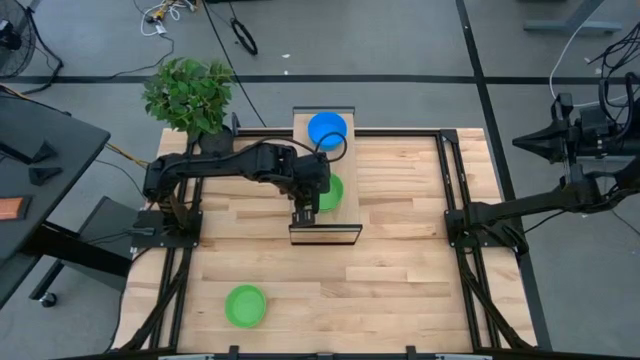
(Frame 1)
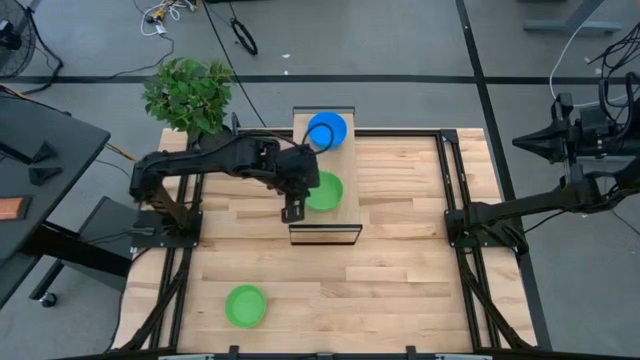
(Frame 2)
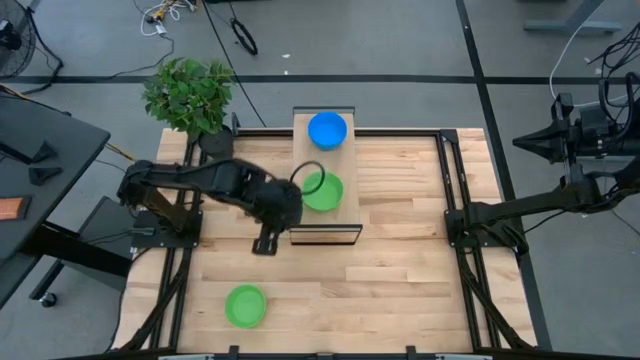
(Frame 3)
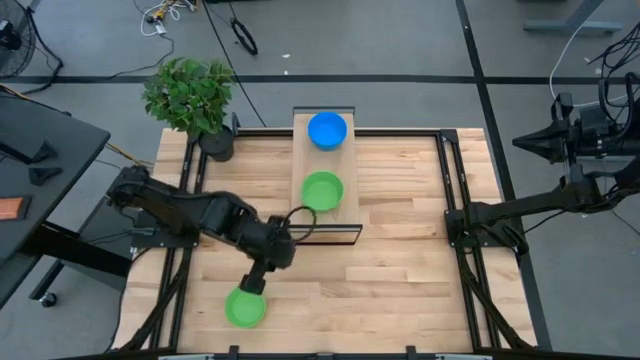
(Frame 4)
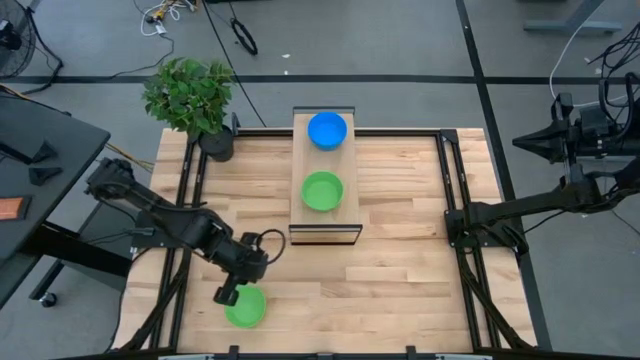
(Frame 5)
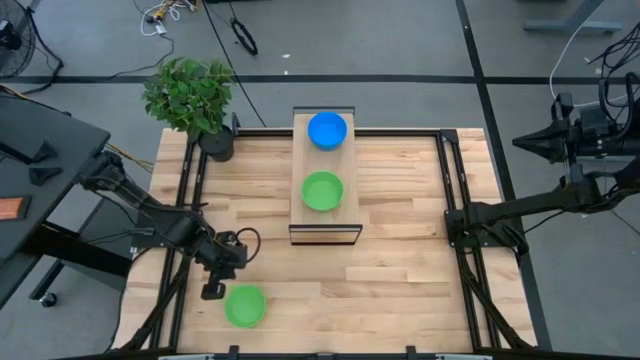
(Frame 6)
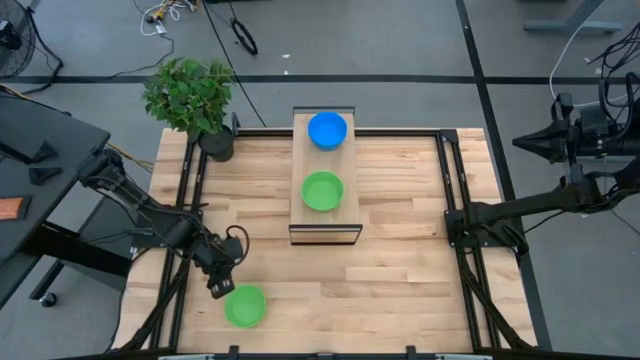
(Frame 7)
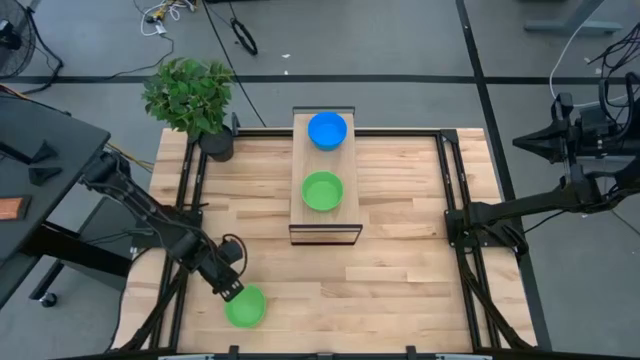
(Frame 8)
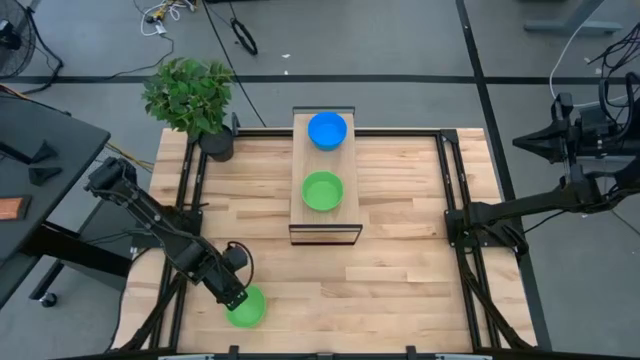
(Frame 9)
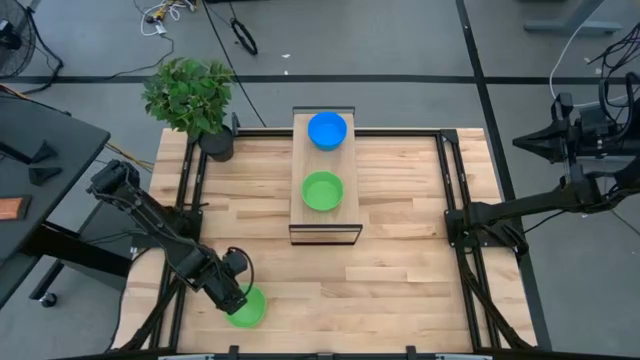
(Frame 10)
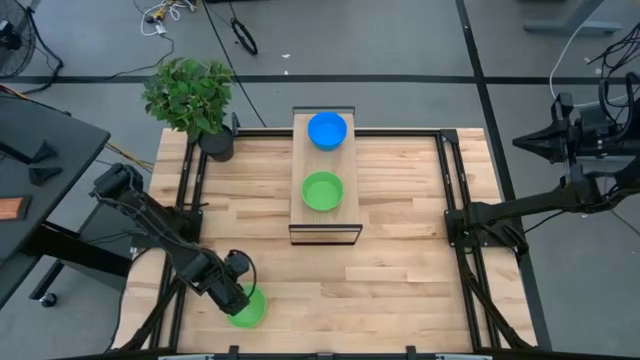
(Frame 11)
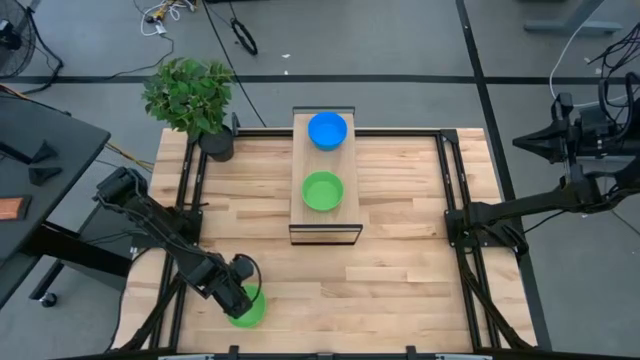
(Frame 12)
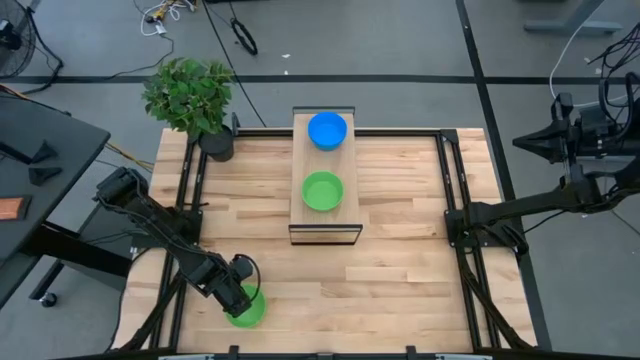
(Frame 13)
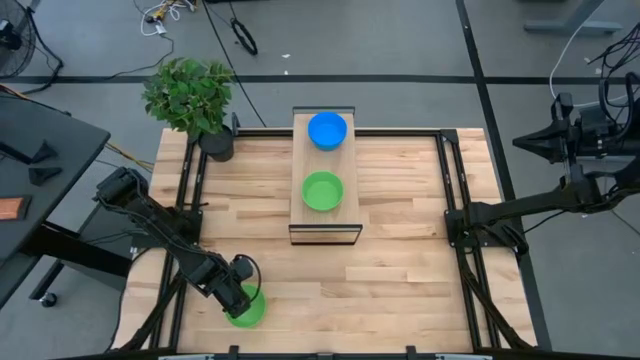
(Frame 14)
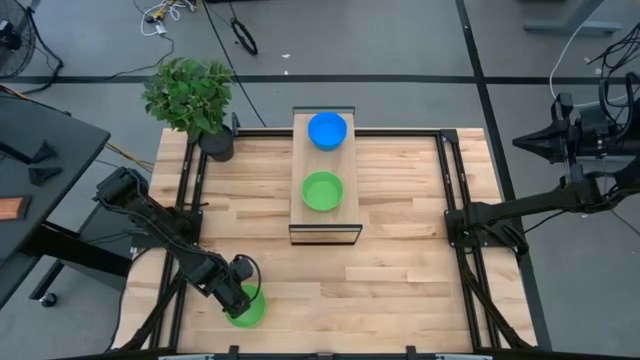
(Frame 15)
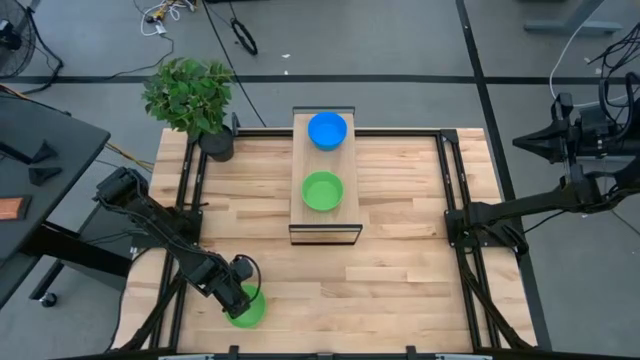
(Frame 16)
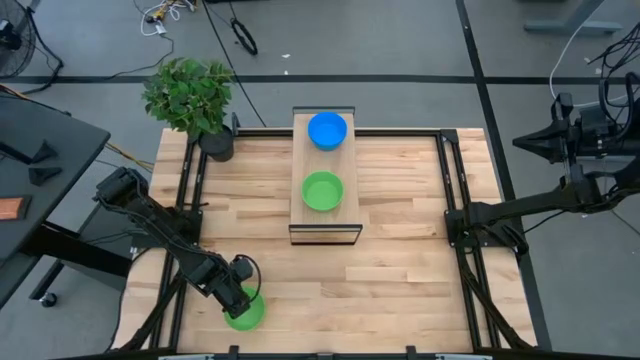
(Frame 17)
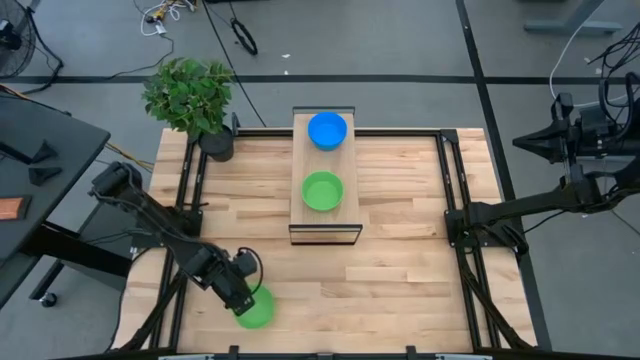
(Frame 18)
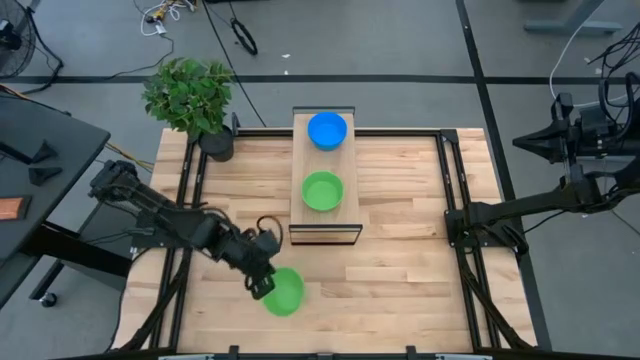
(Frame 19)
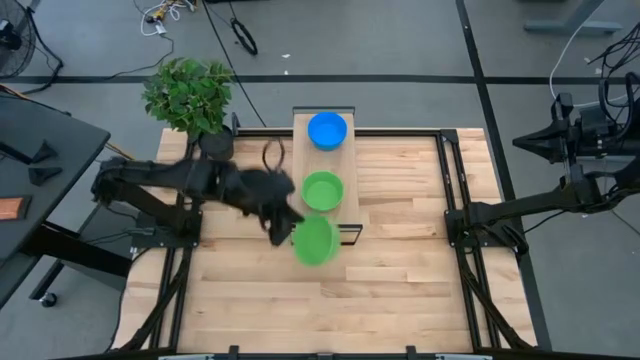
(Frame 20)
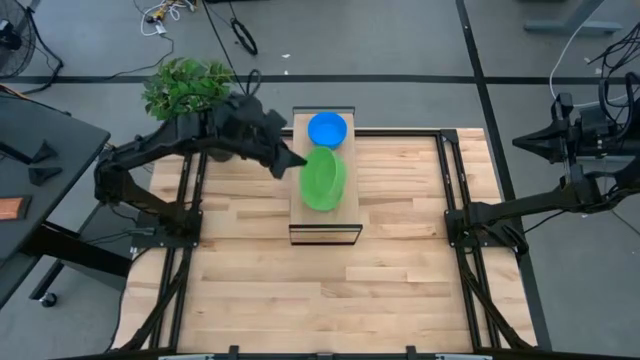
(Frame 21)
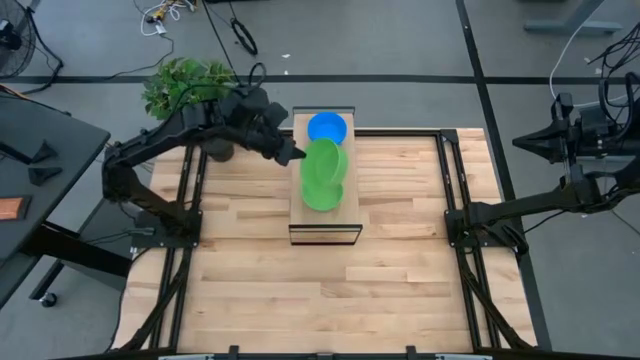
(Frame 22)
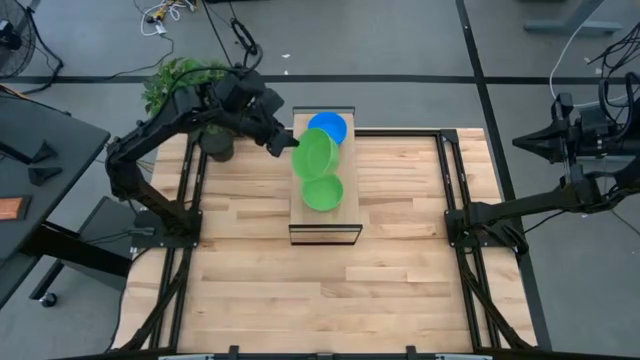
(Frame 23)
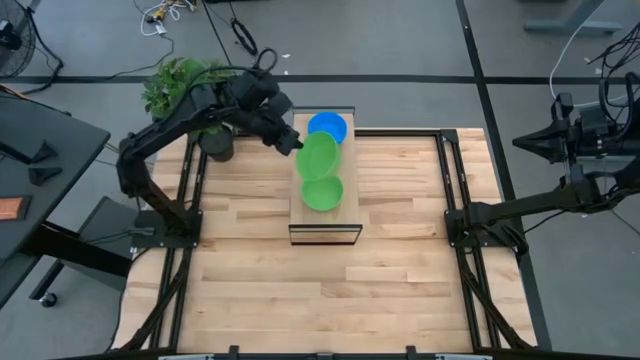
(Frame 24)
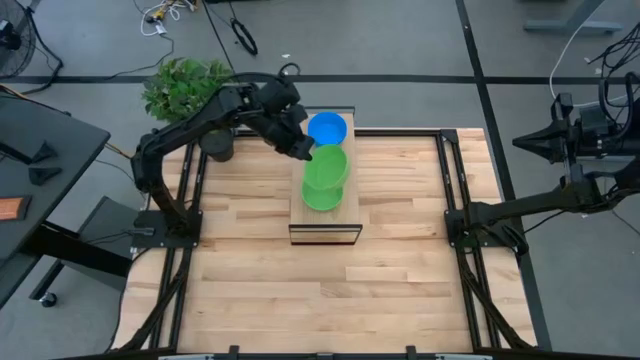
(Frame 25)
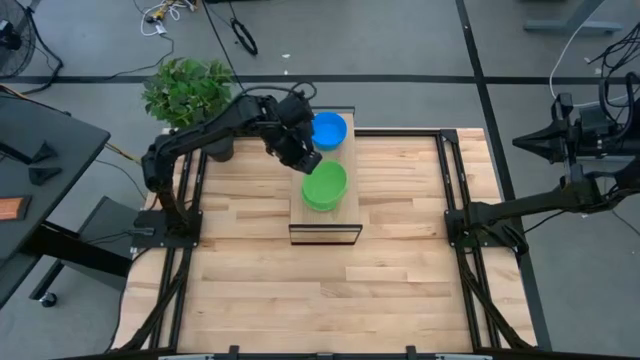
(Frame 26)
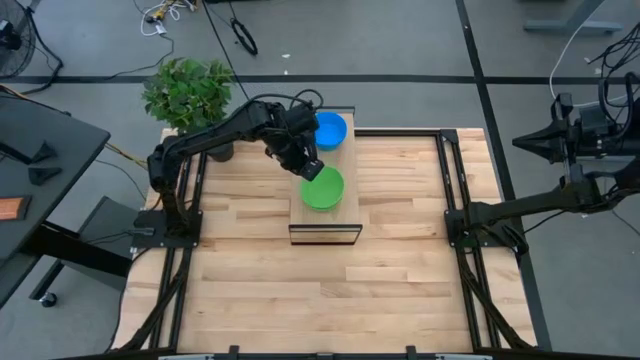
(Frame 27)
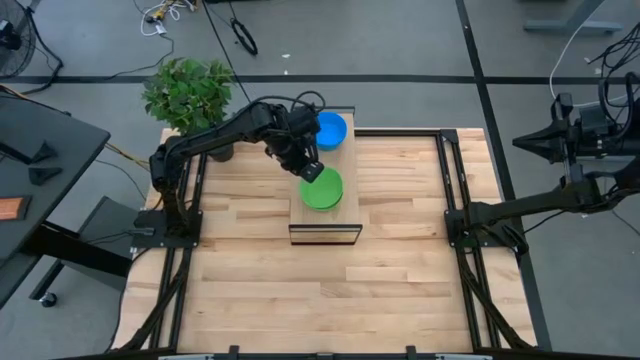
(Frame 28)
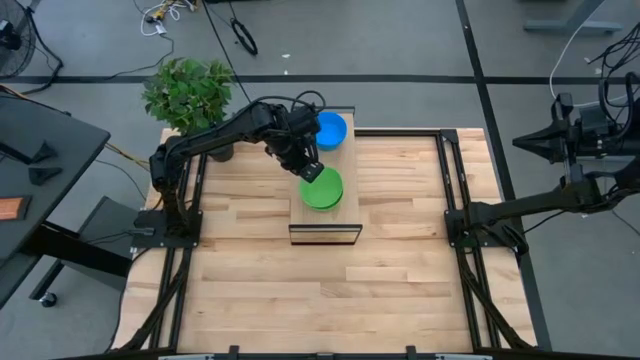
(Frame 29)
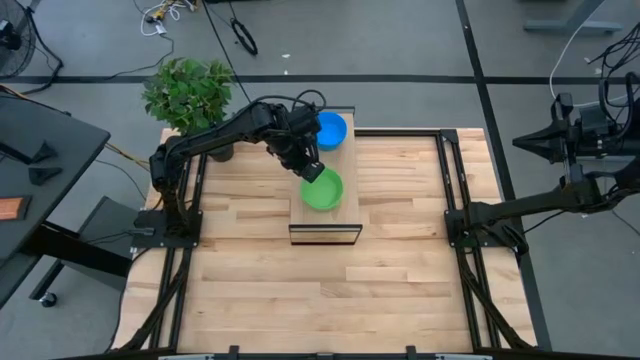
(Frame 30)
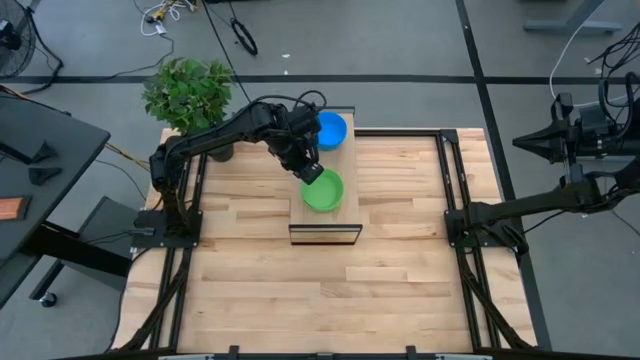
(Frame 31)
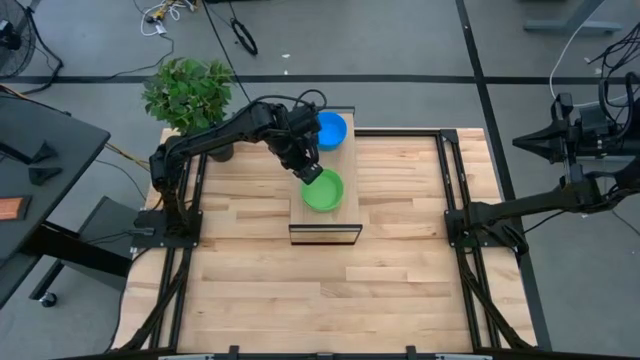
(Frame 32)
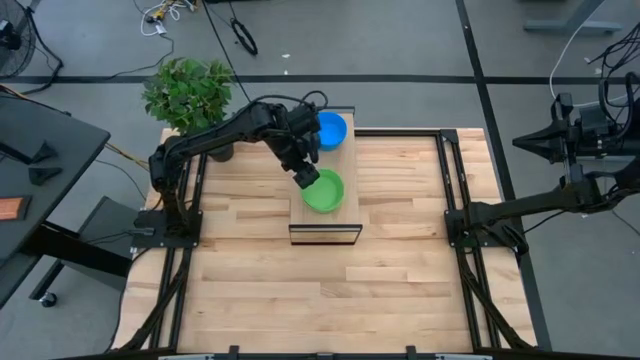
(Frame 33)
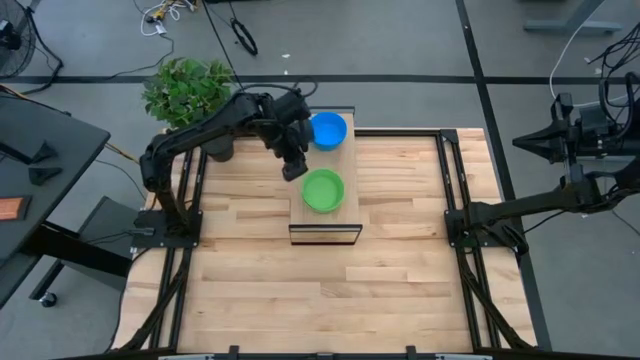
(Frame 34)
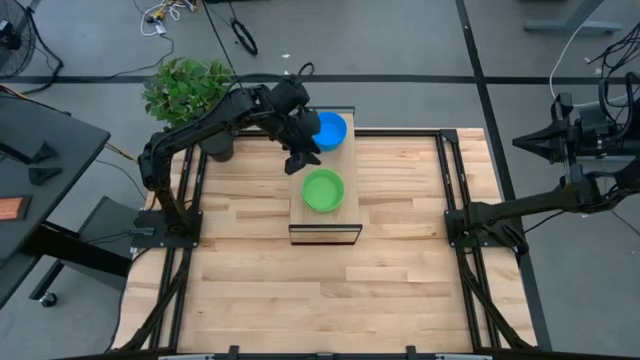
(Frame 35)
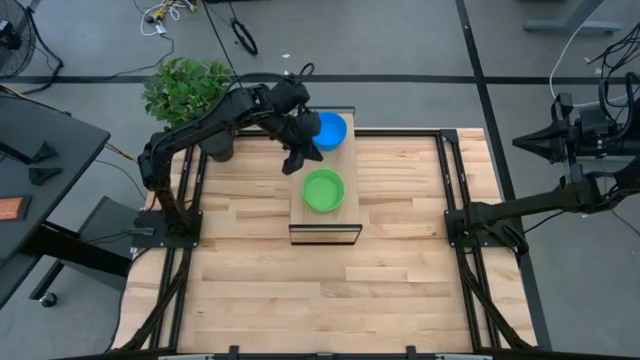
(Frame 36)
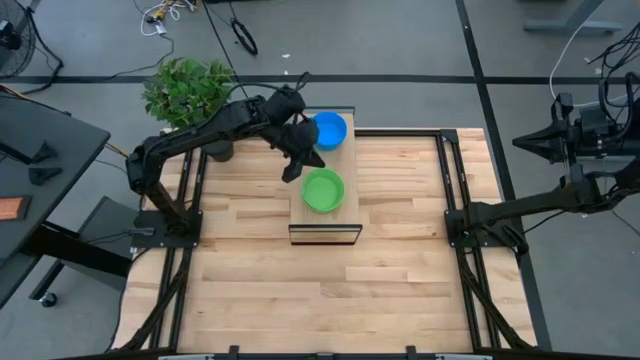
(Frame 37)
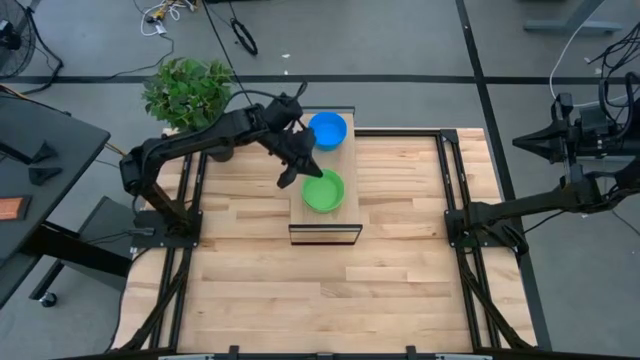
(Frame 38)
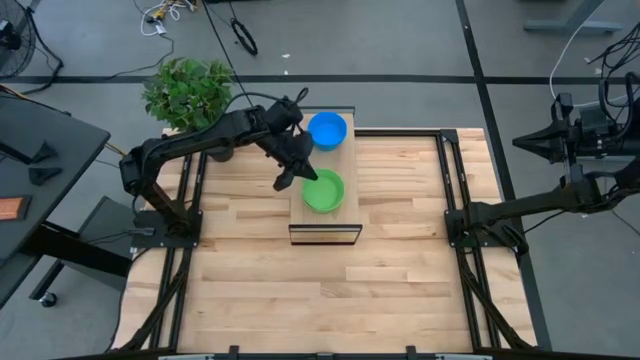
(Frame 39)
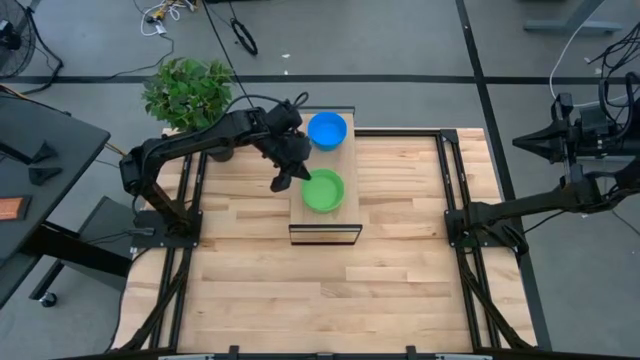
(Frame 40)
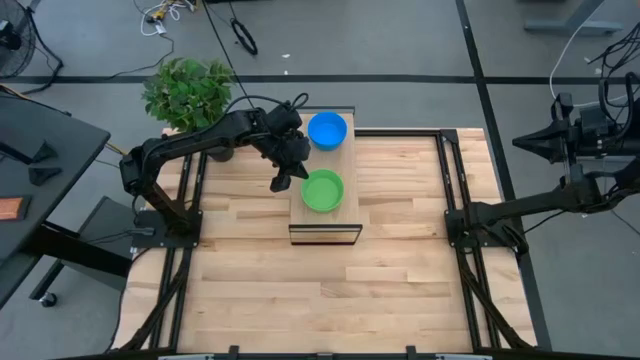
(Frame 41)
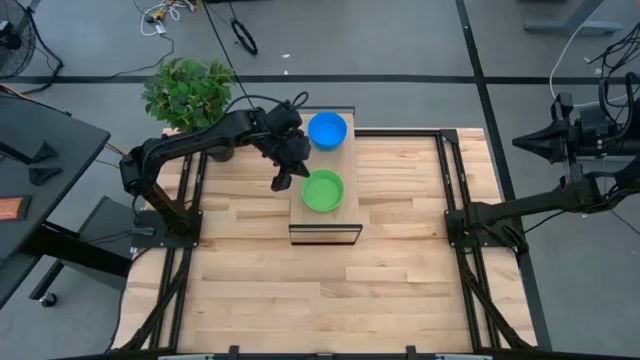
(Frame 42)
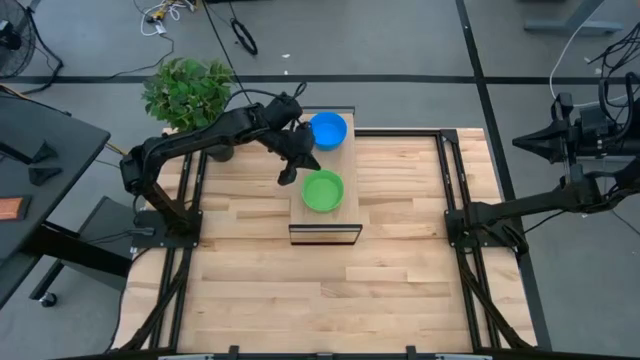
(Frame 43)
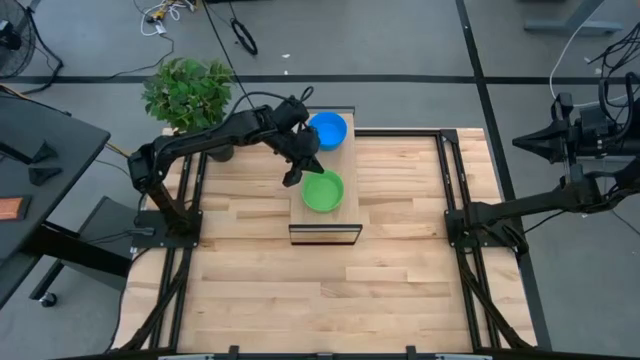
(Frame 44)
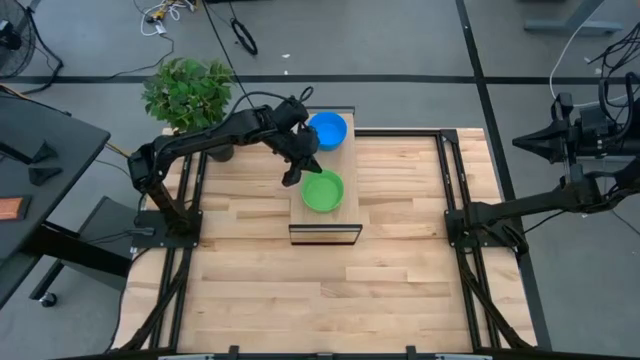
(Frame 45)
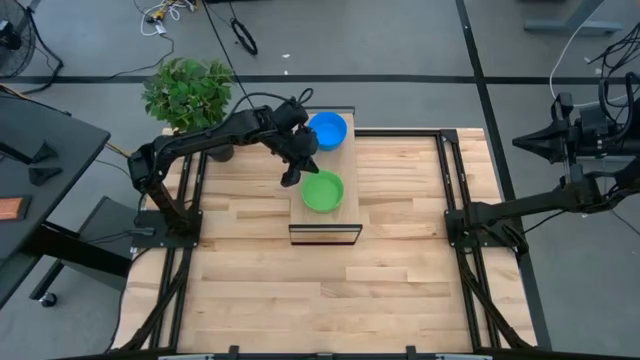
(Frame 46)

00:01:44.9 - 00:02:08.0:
Task: Pick & Place Mini bowls
Stack the green bowl on the green bowl on the shelf
